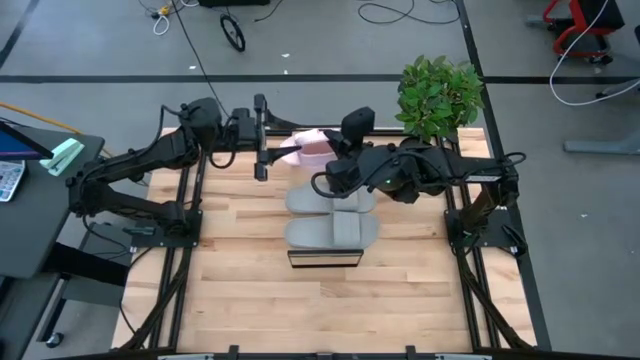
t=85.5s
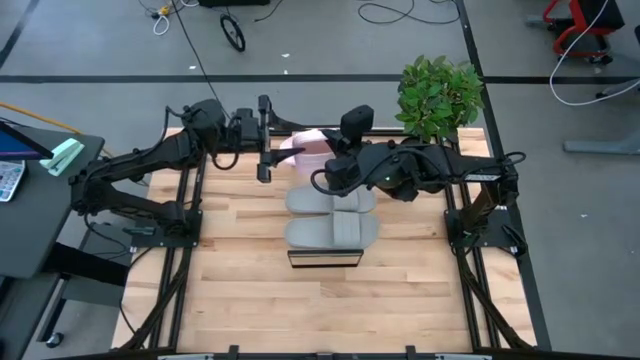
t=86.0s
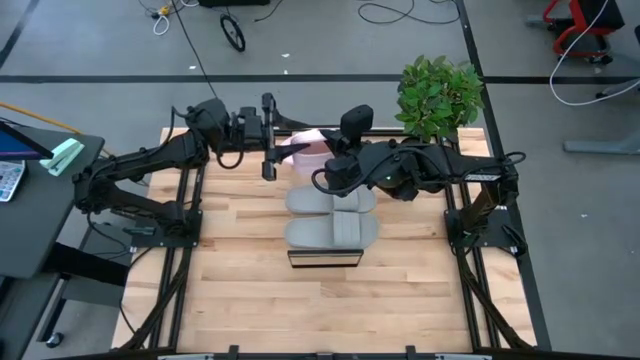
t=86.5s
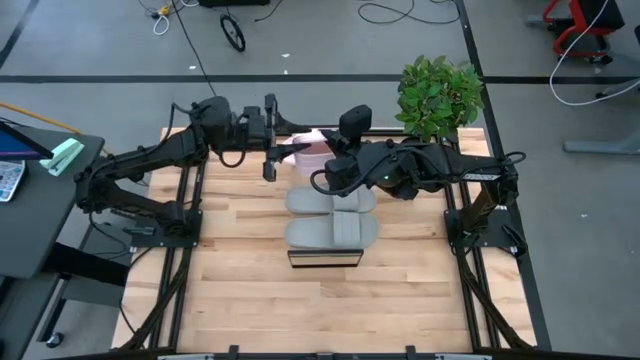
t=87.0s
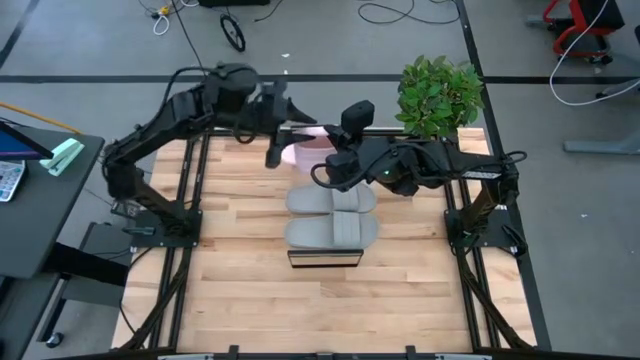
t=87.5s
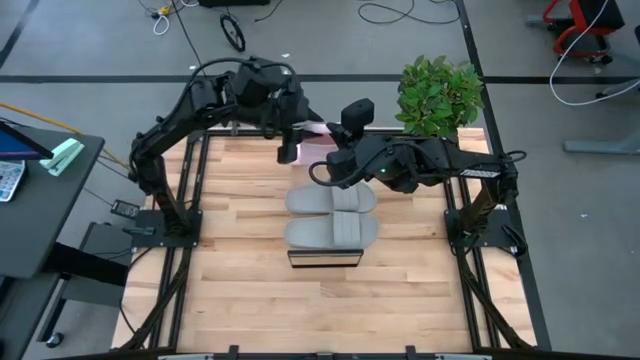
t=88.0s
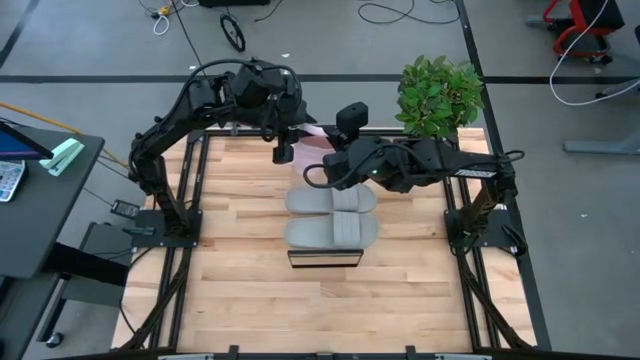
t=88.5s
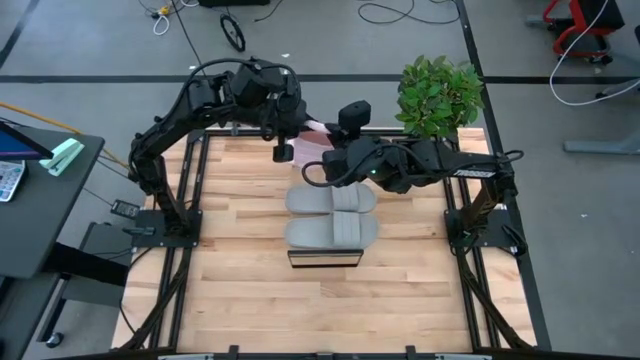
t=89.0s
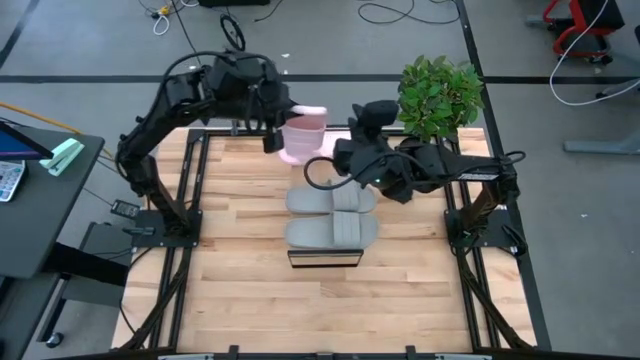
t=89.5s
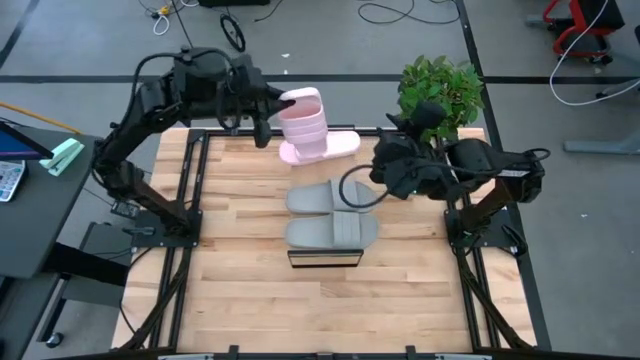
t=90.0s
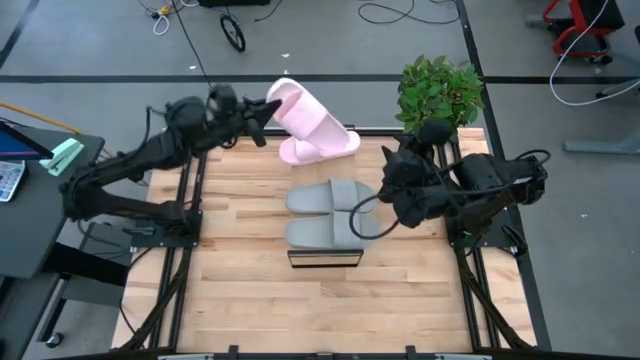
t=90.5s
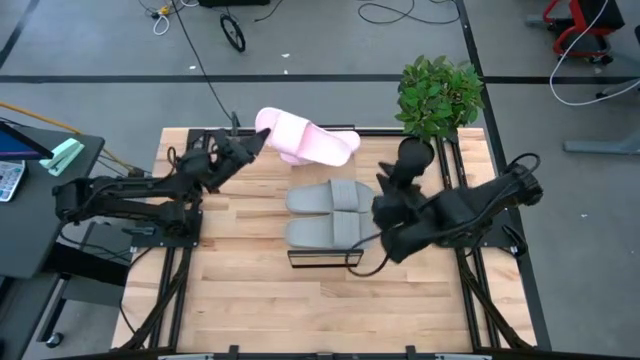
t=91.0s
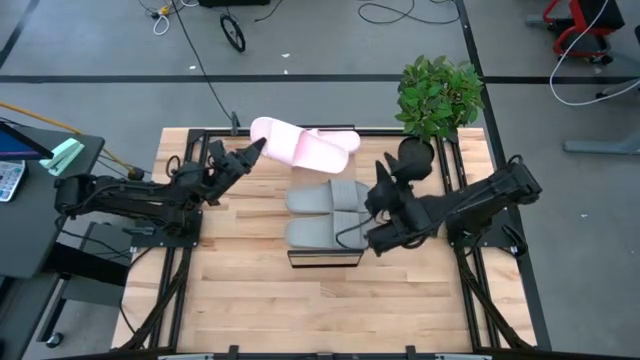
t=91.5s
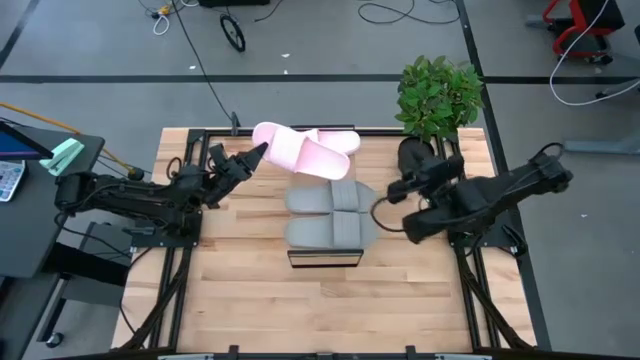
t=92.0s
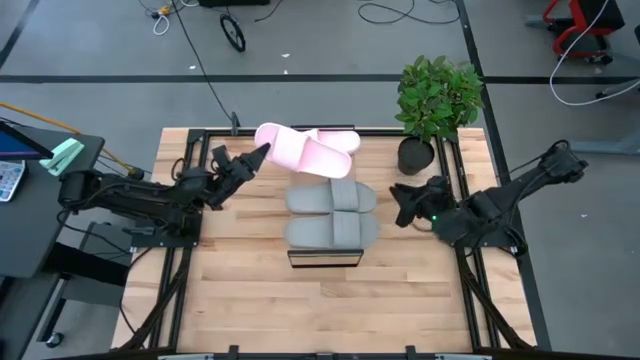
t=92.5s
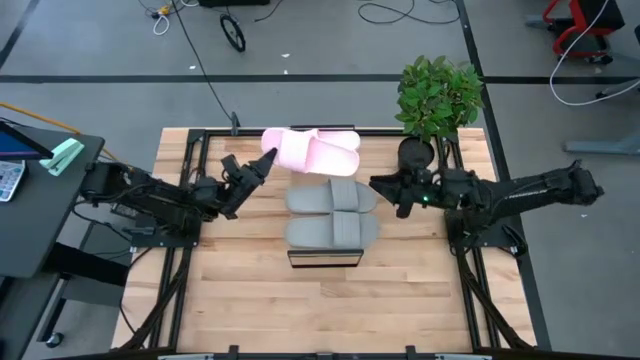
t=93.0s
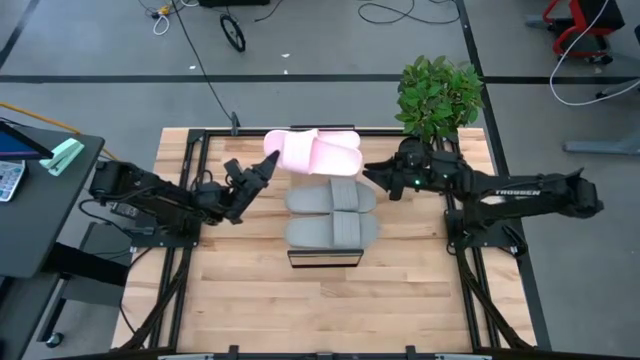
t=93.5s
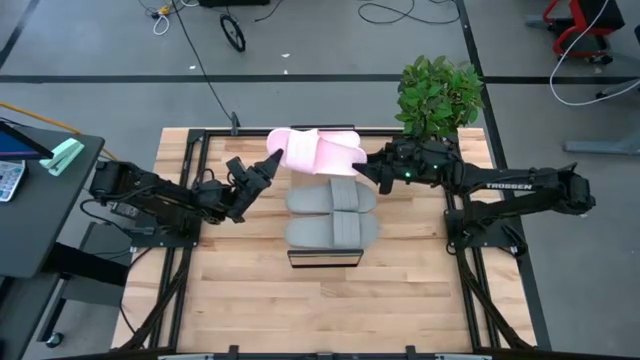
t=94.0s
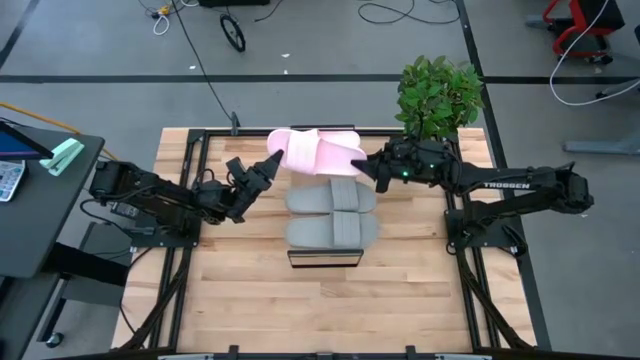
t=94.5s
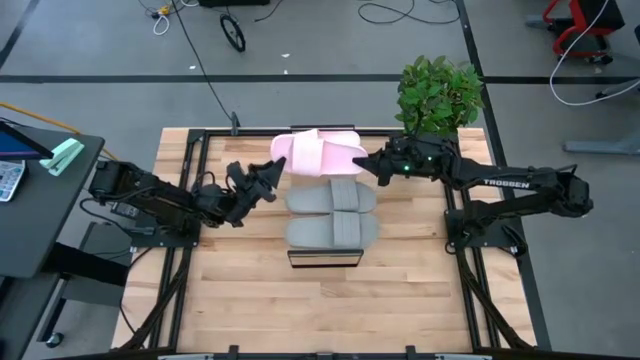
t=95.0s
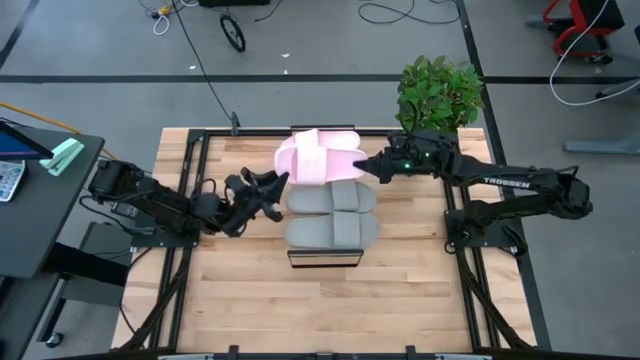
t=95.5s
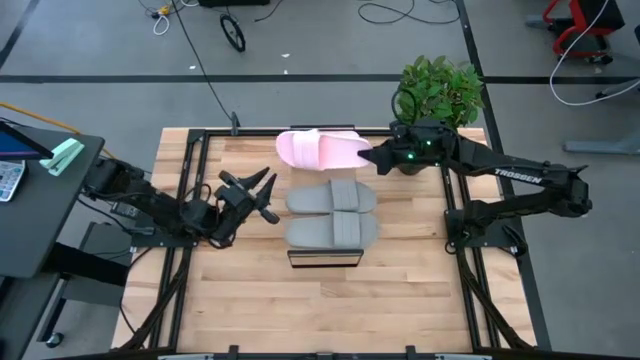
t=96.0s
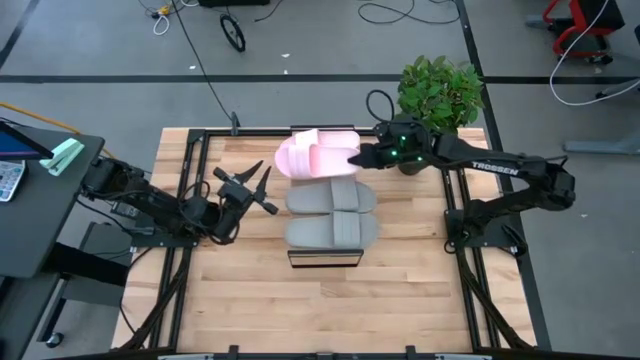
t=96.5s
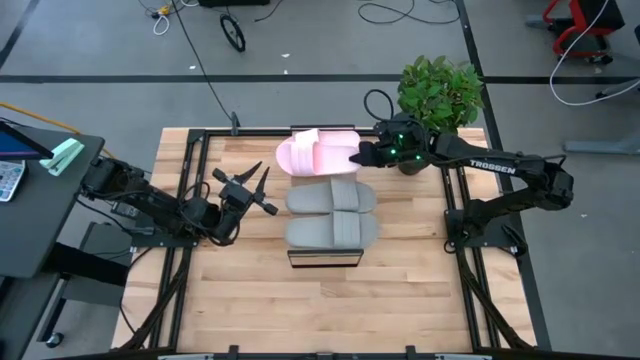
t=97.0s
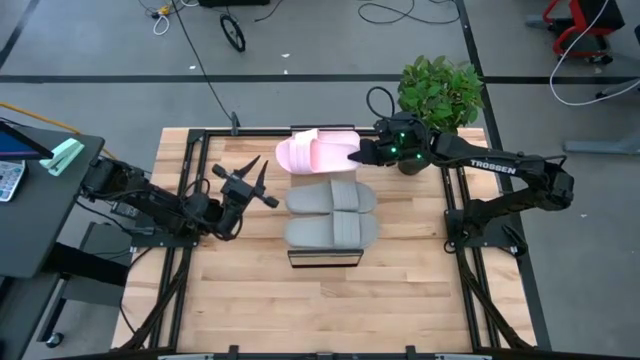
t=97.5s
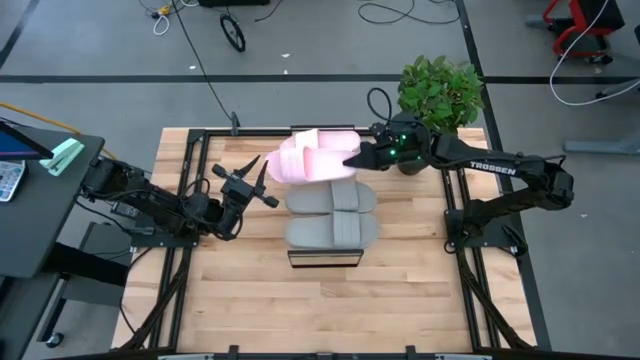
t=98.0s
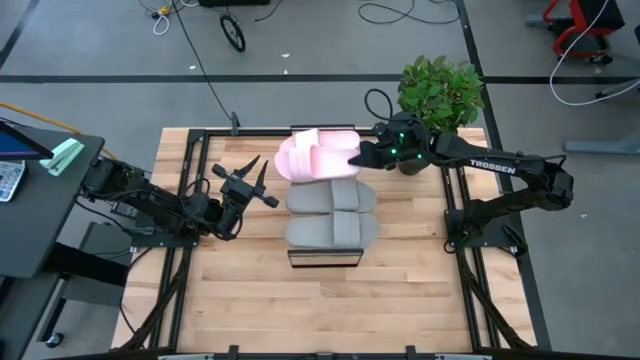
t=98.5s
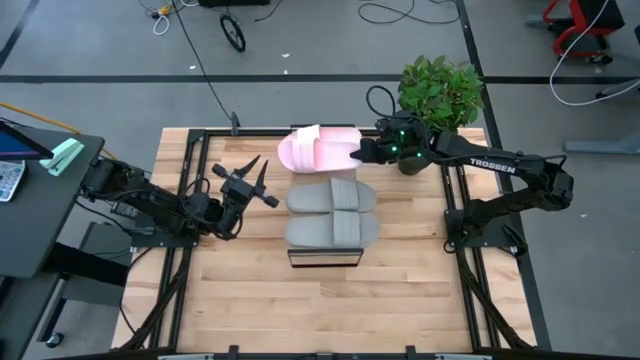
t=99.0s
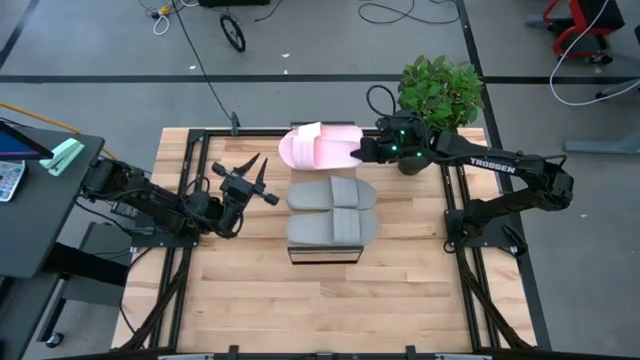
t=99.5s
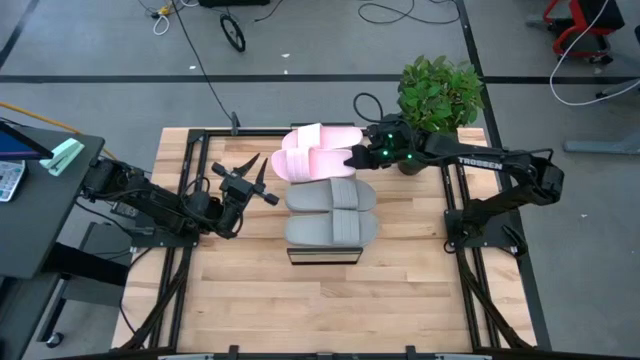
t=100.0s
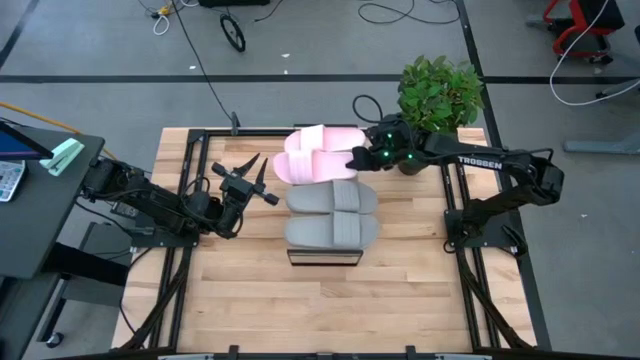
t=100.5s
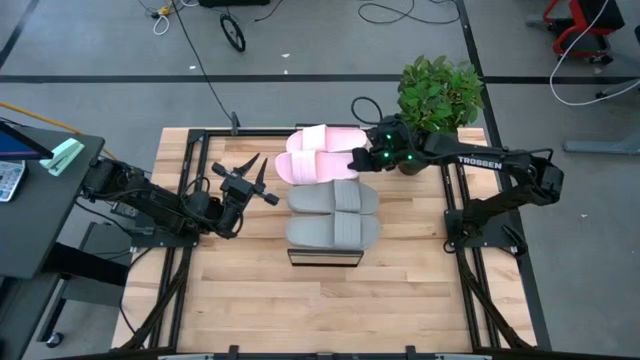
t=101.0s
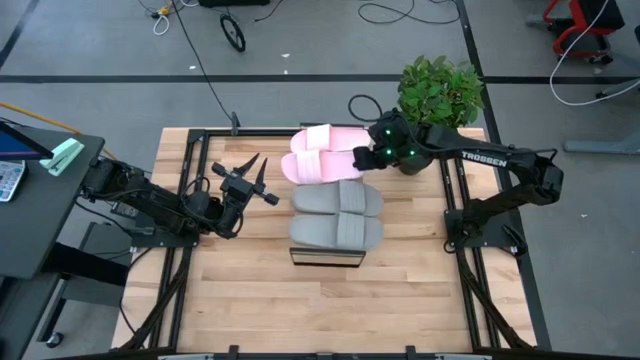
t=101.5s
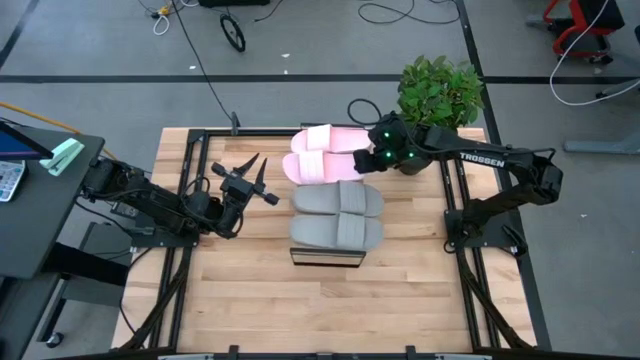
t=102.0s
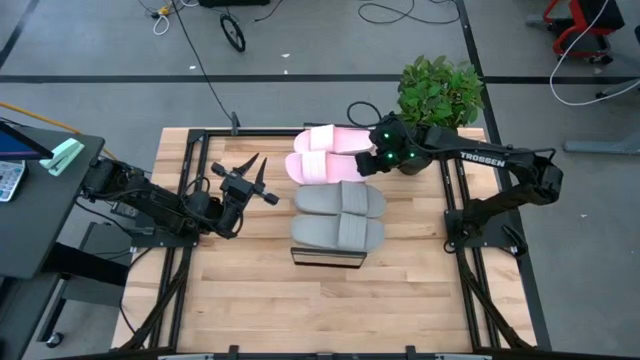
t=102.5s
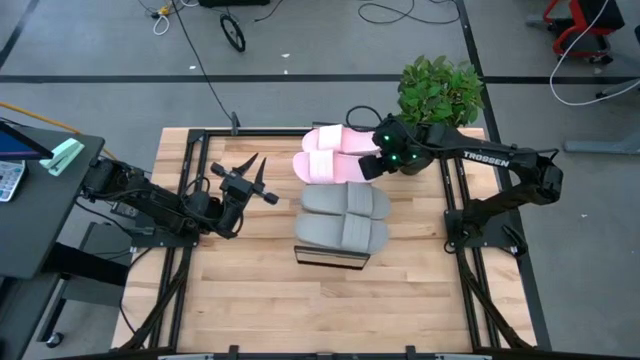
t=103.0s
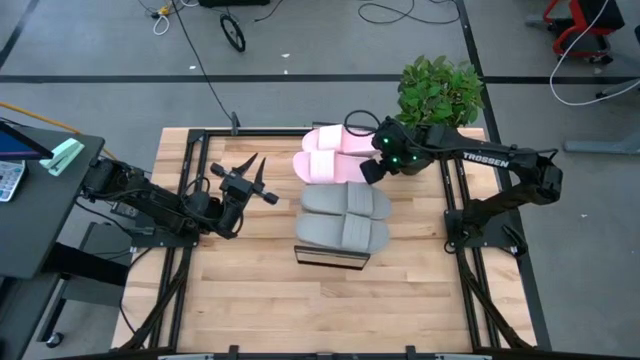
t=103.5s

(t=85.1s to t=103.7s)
Task: Pick and place slides into the shelf
Put the pink slipper on the shelf

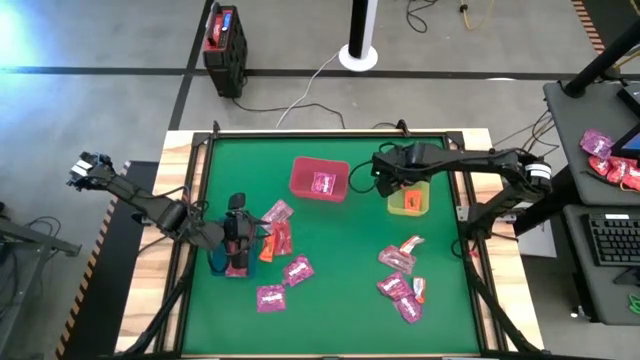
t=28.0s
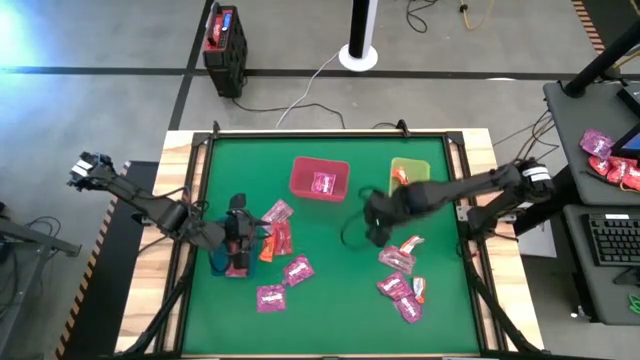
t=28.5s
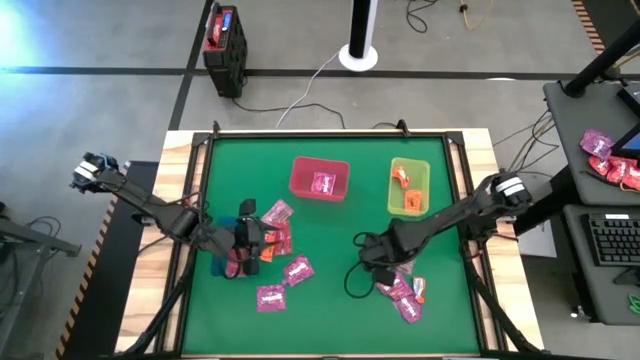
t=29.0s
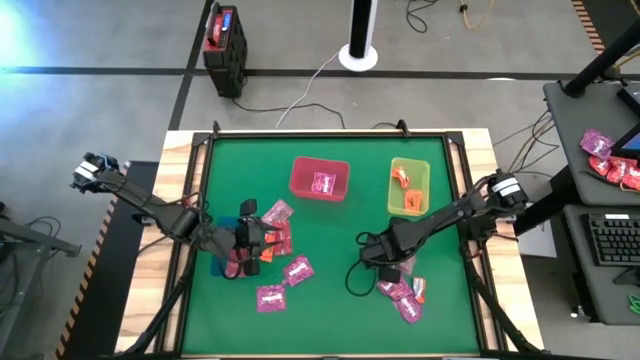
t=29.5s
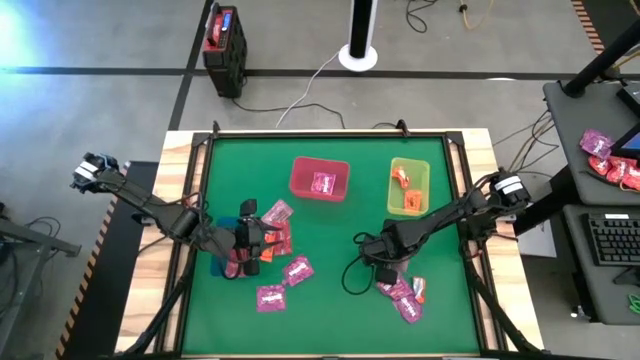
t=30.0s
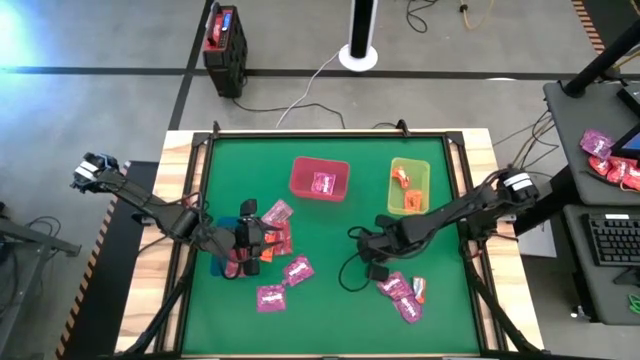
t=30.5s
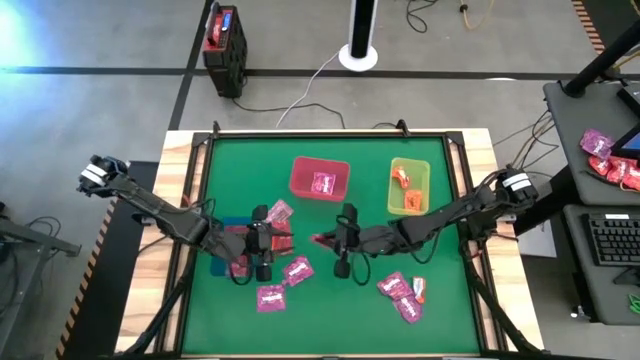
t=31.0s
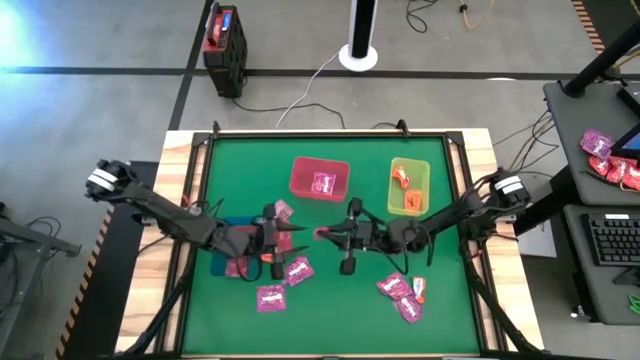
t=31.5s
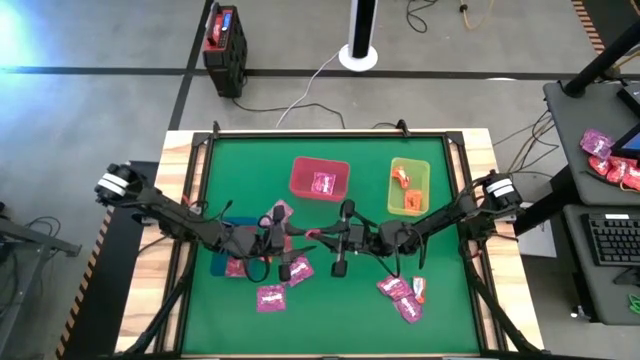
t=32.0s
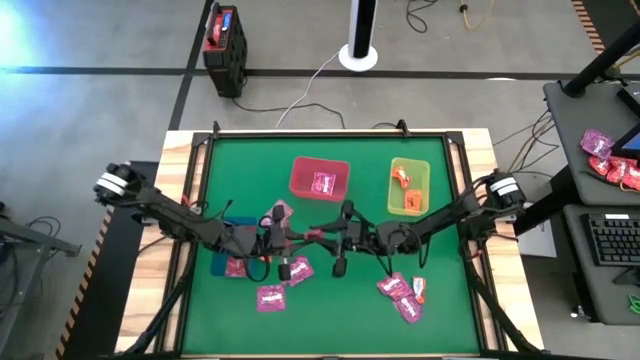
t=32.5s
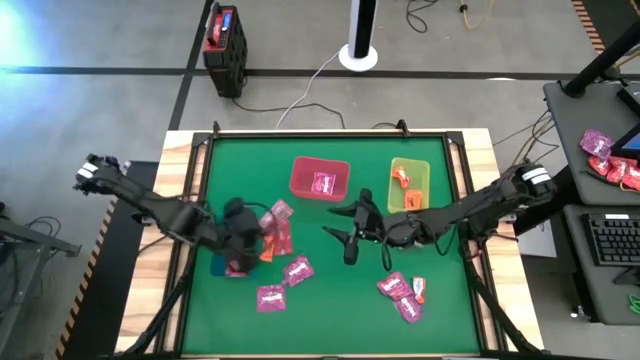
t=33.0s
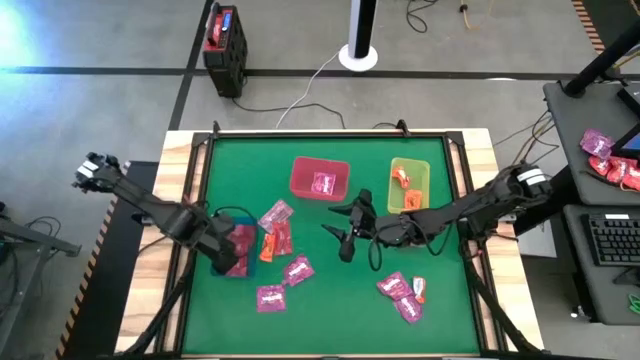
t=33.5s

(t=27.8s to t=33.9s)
Task: Sort candy by brand, put in halloween buckets
Put the red candy into the blue bin
